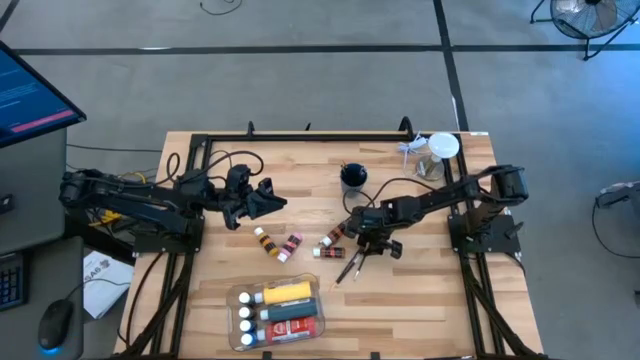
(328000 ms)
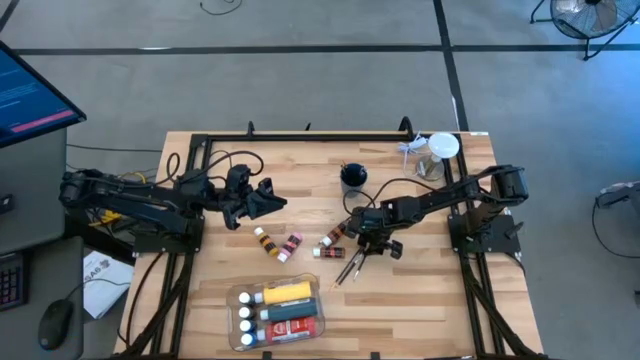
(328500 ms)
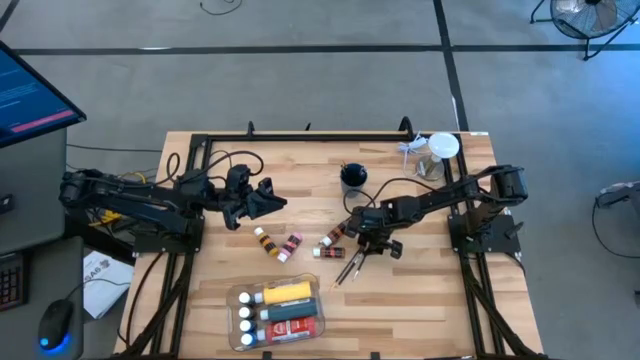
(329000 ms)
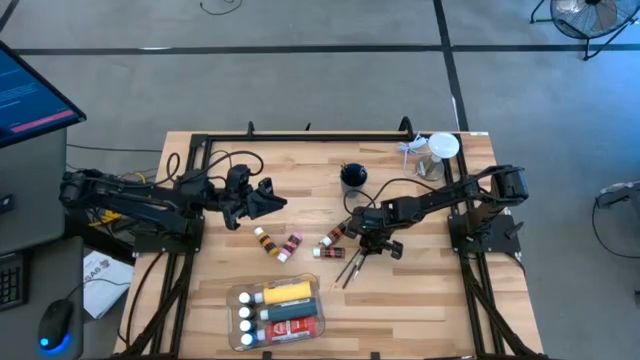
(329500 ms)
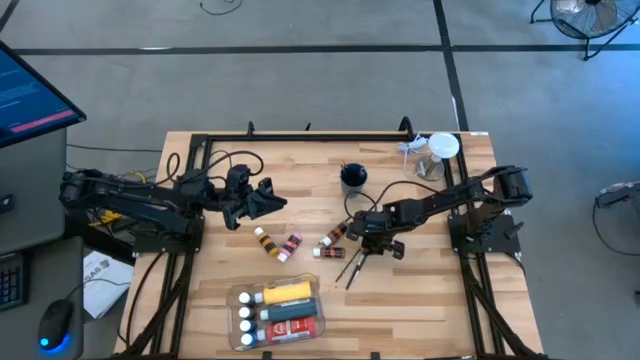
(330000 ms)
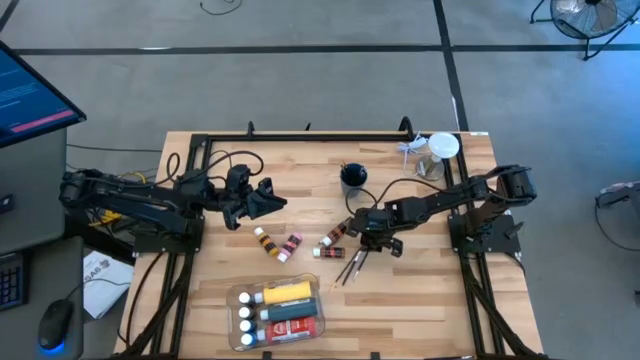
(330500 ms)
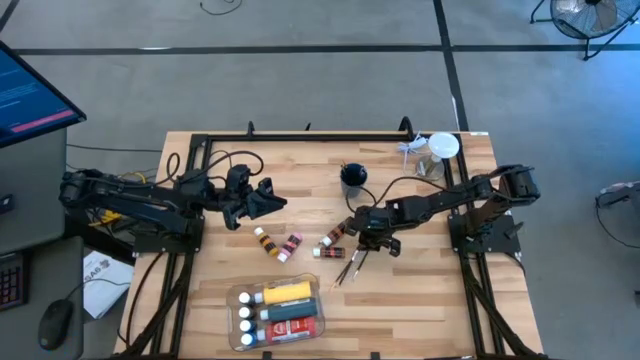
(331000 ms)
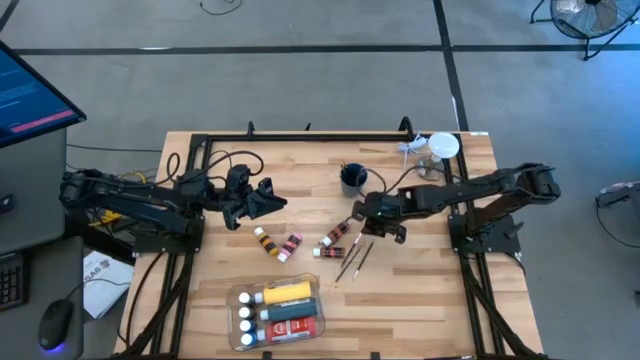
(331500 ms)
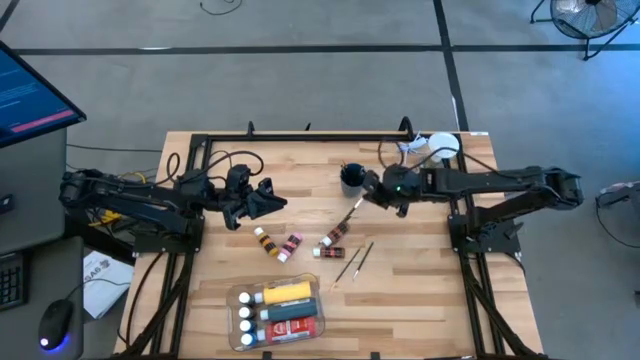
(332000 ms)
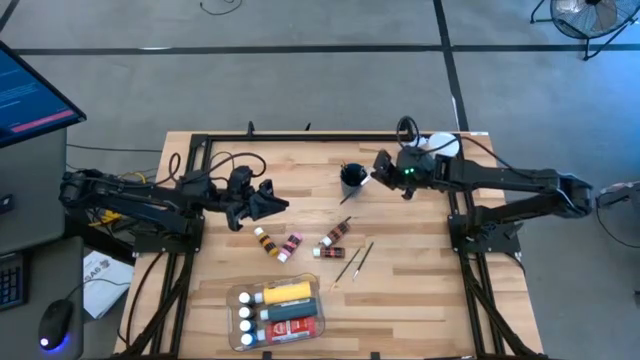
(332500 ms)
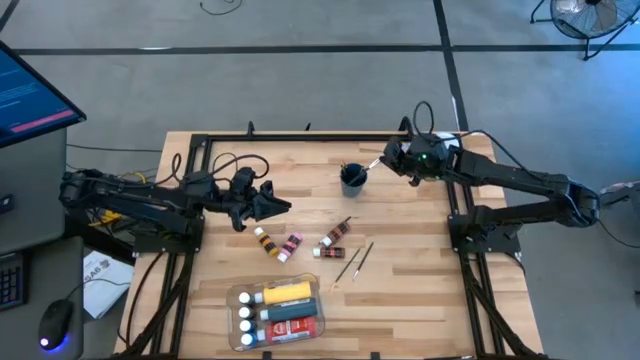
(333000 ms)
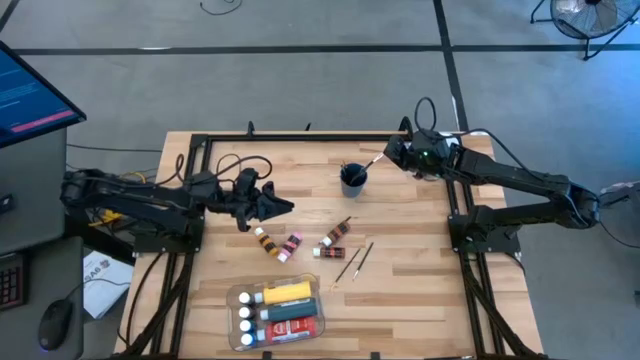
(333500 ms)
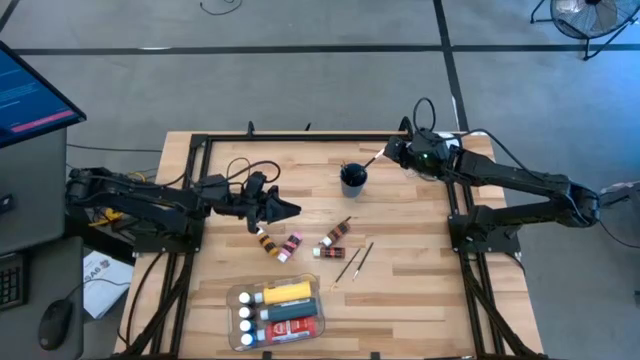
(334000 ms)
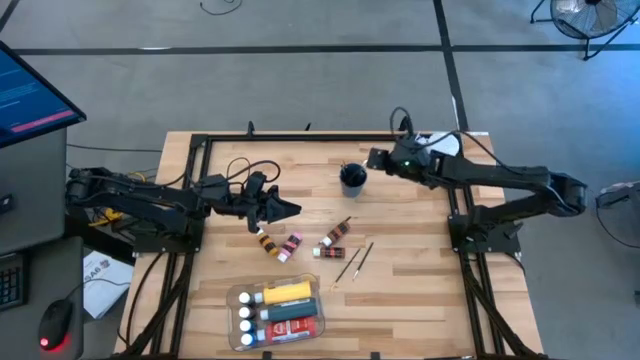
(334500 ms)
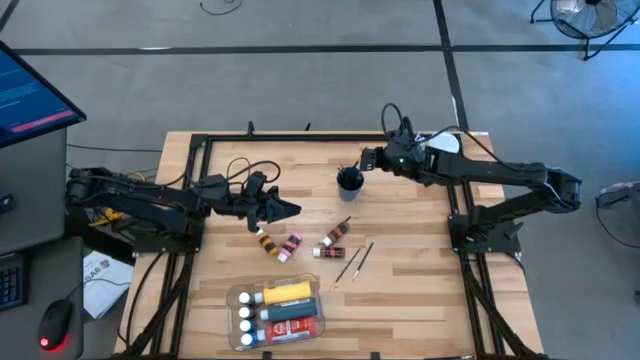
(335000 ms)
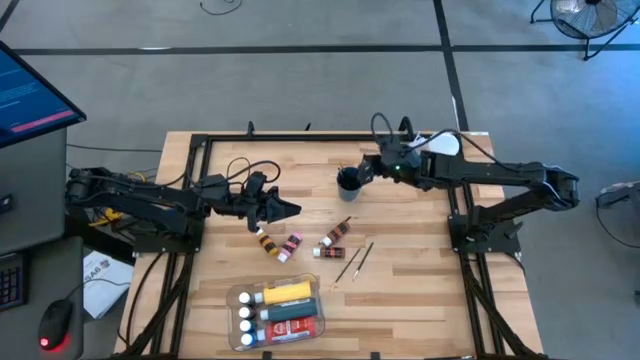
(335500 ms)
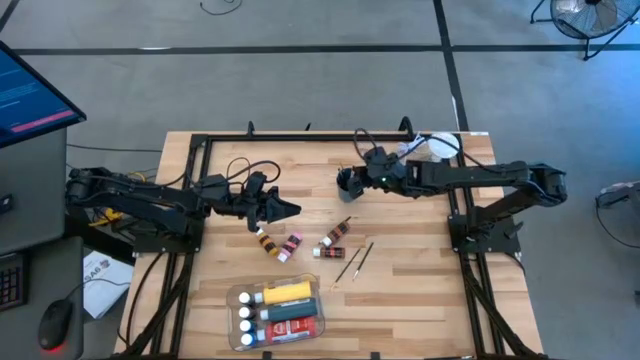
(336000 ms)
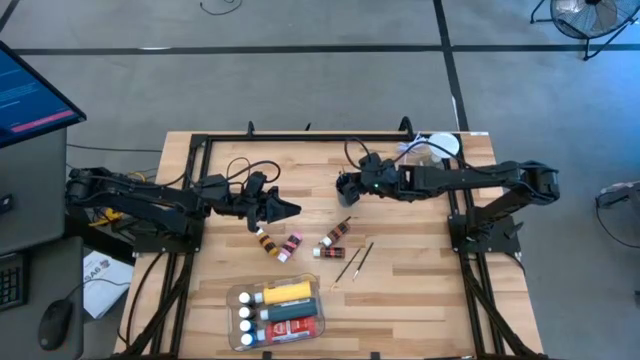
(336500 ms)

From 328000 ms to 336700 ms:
Task: Pick & Place Paint Supplies
Put the paint brush into the blue cup

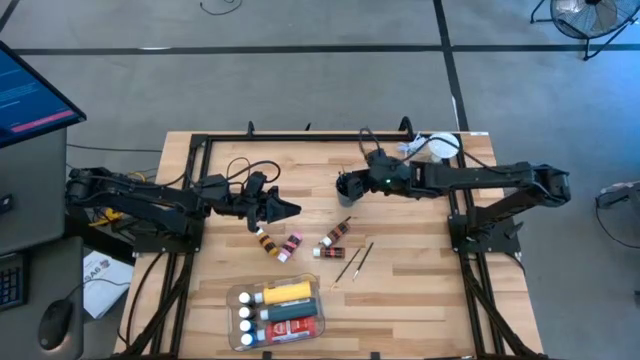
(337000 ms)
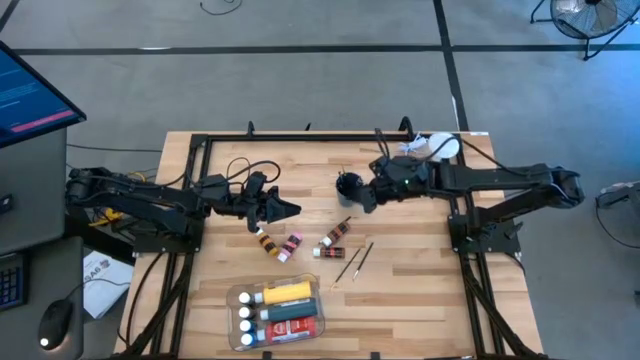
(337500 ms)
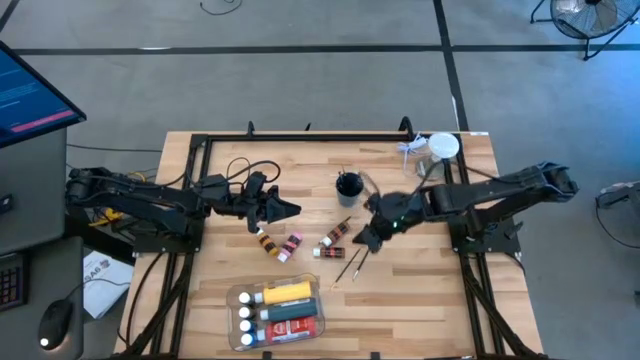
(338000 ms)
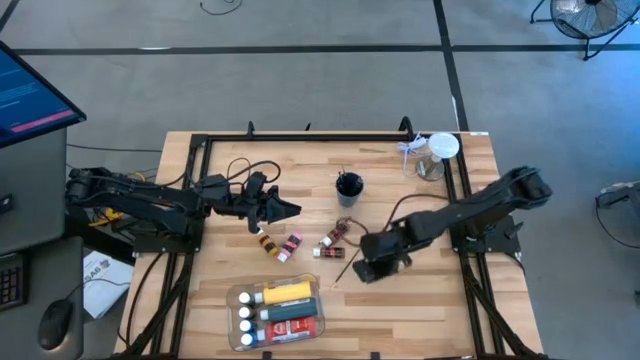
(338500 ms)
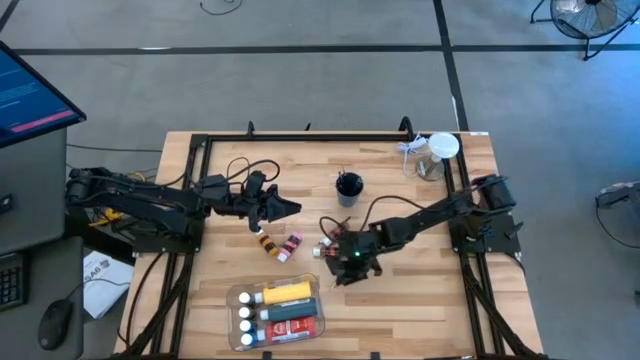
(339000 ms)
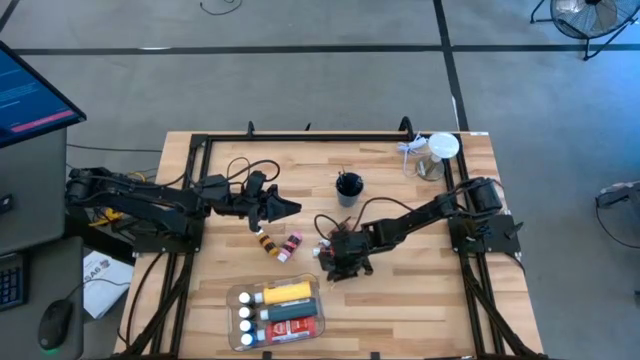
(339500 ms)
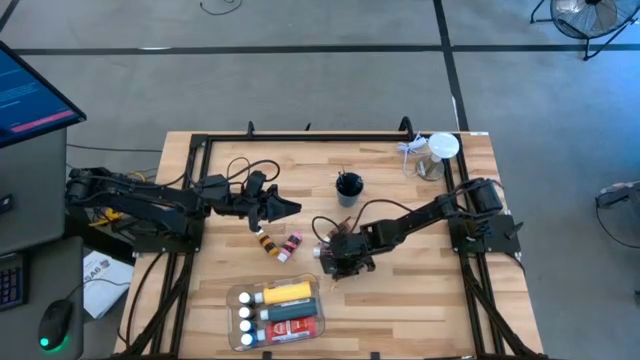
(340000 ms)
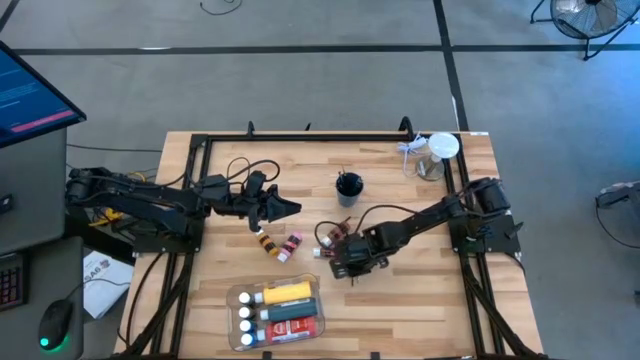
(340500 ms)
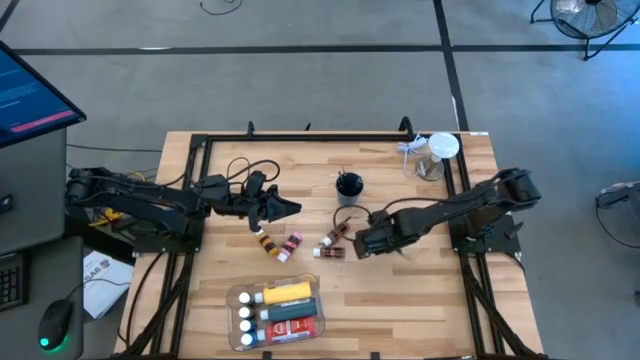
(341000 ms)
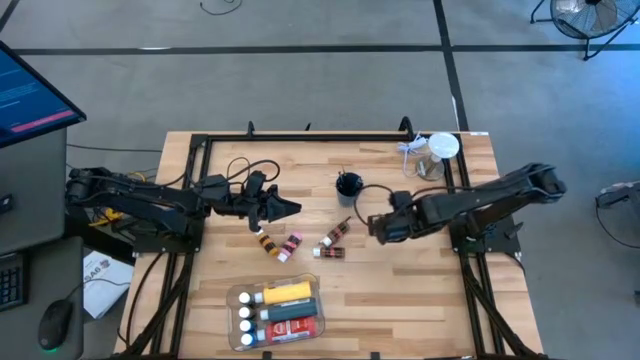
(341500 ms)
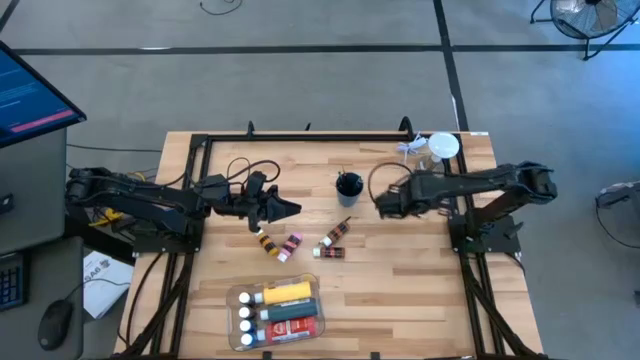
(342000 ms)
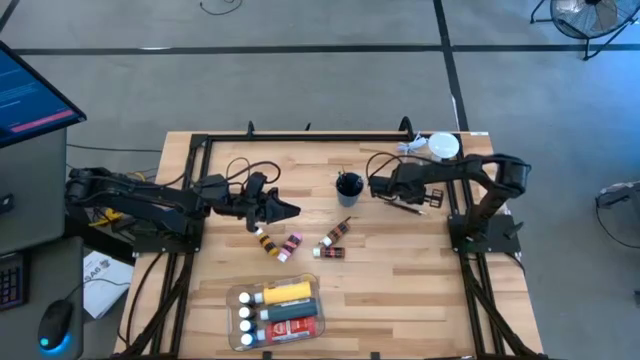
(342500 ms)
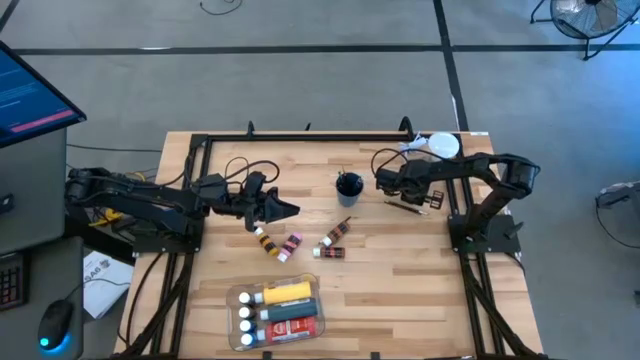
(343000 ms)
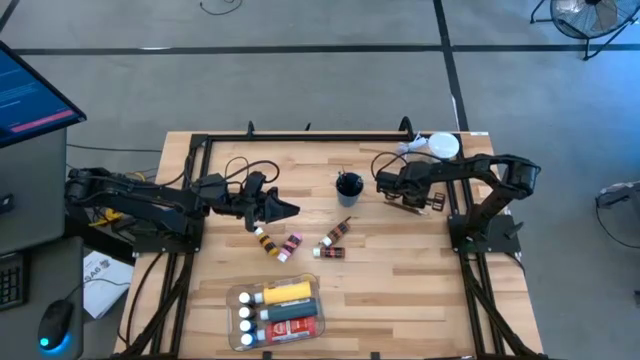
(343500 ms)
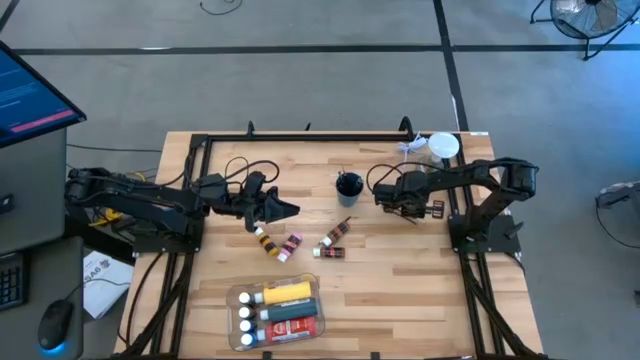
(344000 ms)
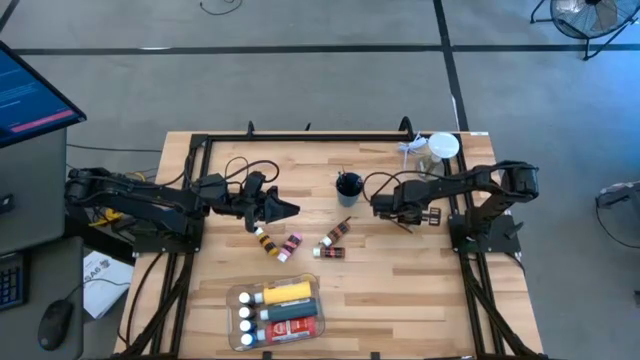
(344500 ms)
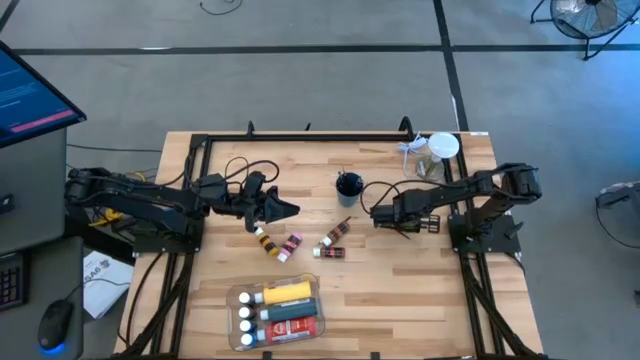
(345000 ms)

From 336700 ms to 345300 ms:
Adjust the paint brushes on the table

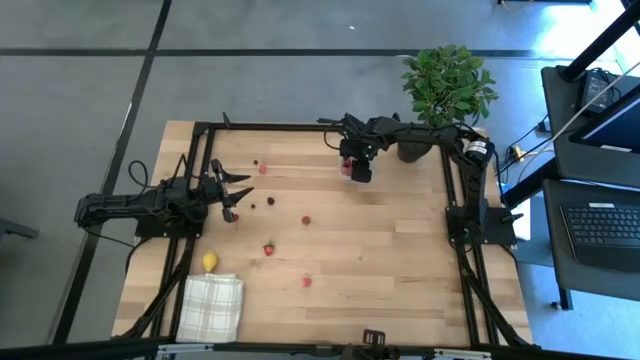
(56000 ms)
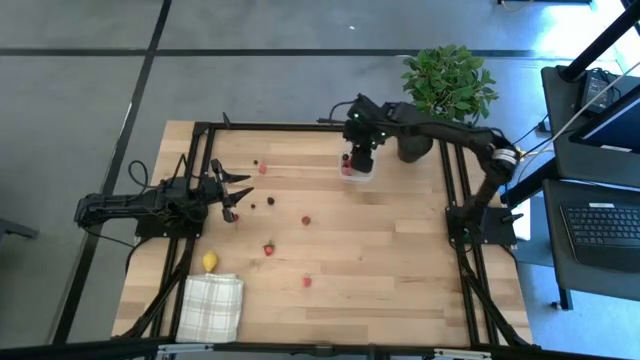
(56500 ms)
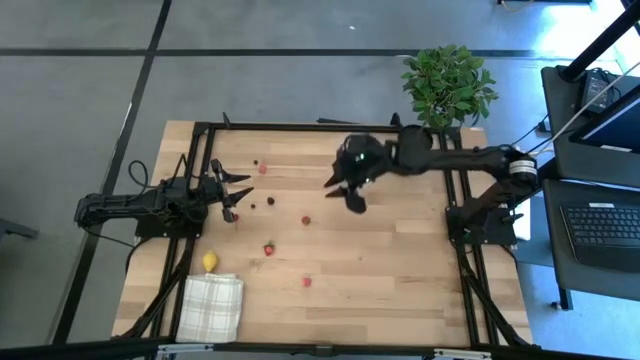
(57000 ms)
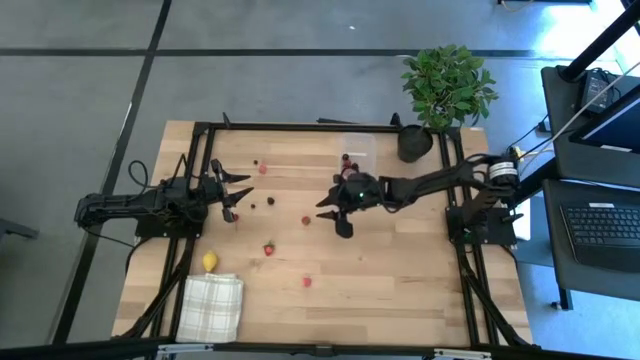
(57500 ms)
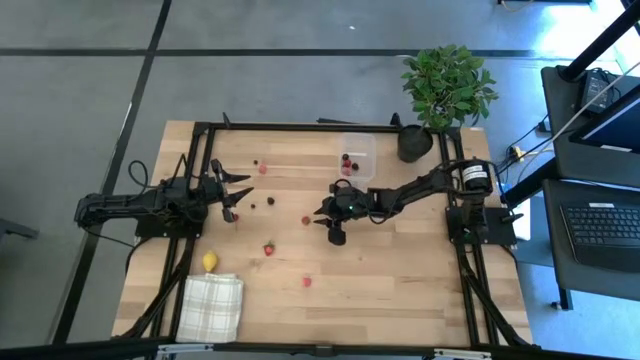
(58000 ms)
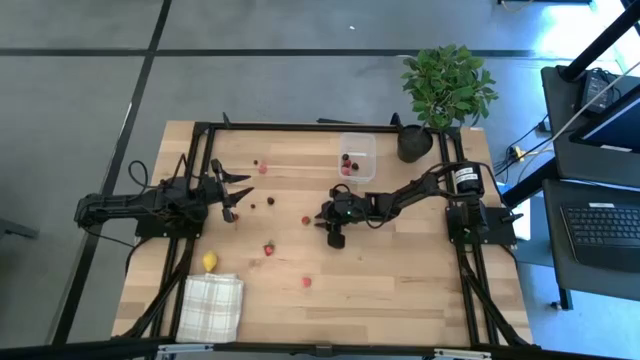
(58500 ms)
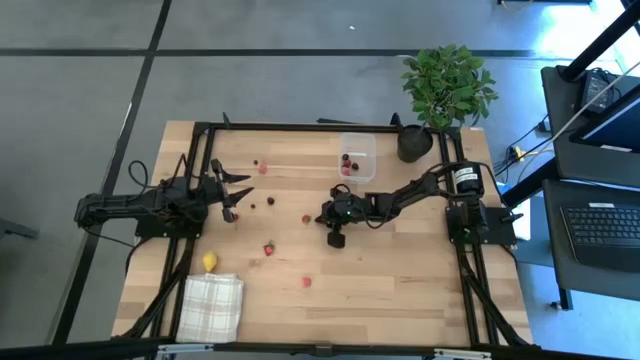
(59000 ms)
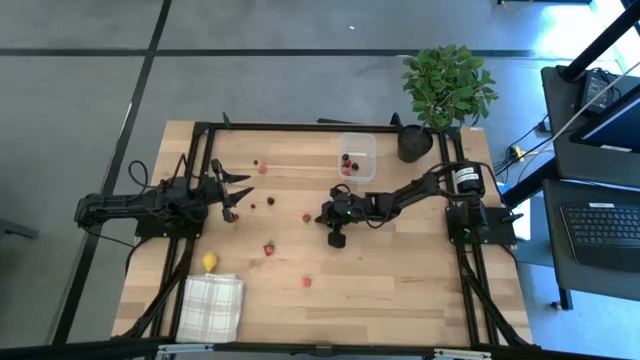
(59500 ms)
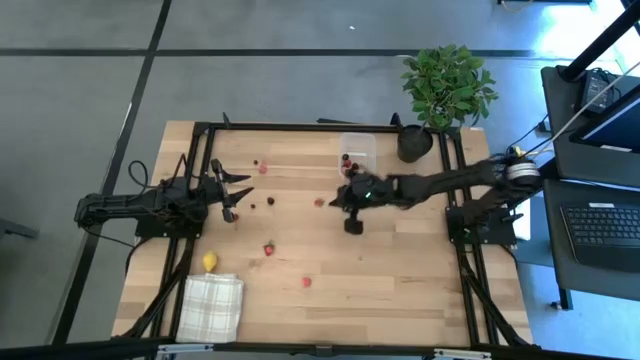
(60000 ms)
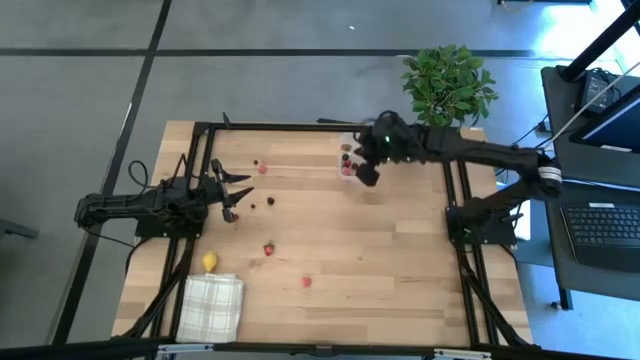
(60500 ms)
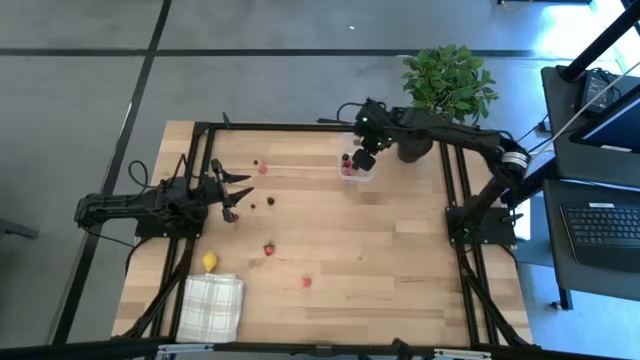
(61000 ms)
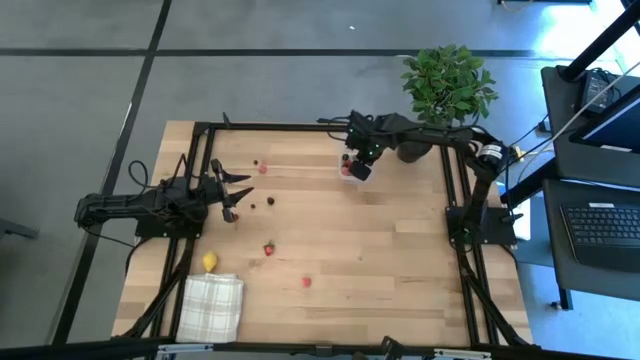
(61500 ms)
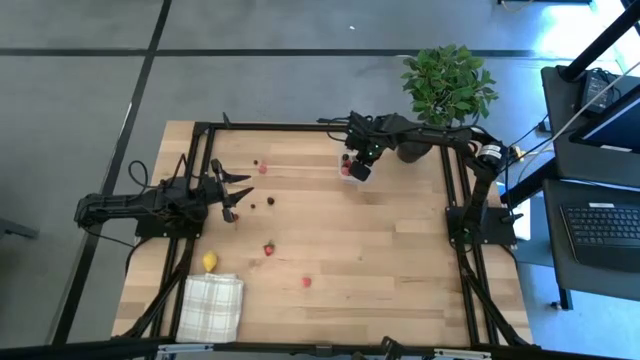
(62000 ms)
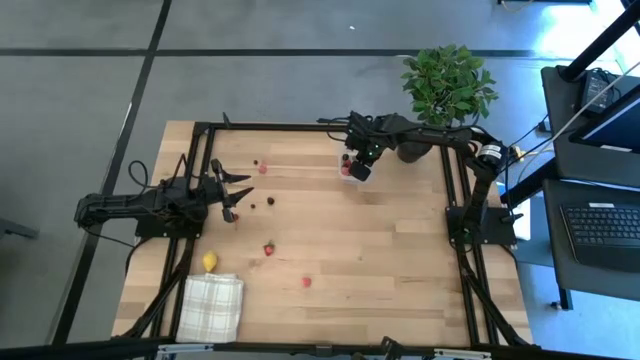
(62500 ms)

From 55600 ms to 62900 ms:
Task: Pick and placing Produce into tupperware
Put the top strawberry into the transparent bin
